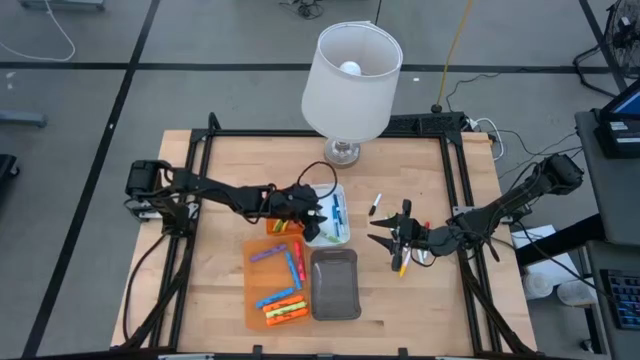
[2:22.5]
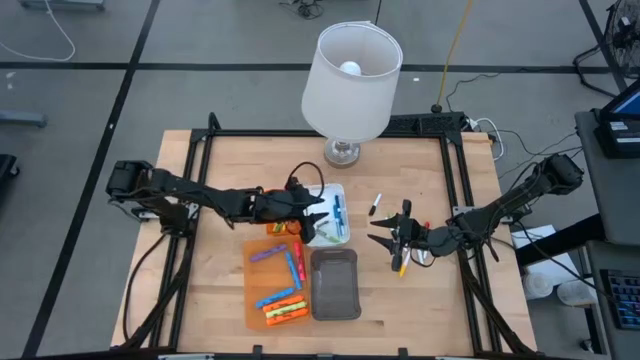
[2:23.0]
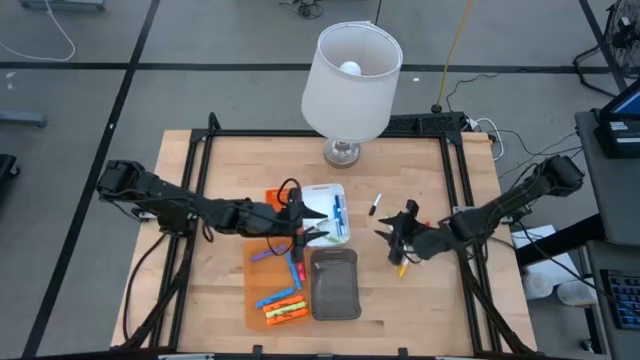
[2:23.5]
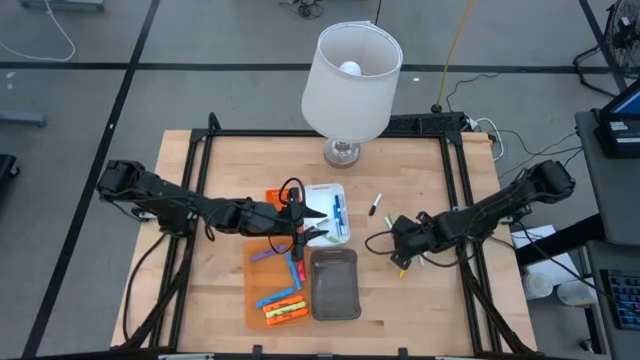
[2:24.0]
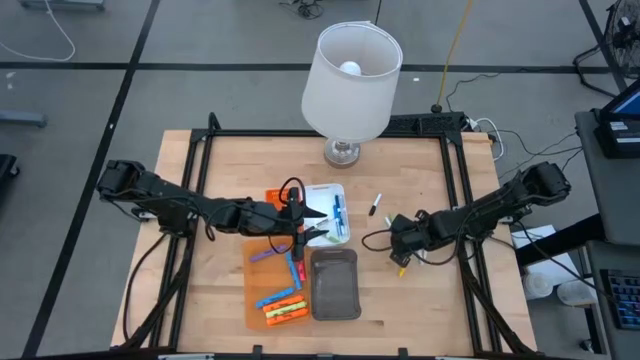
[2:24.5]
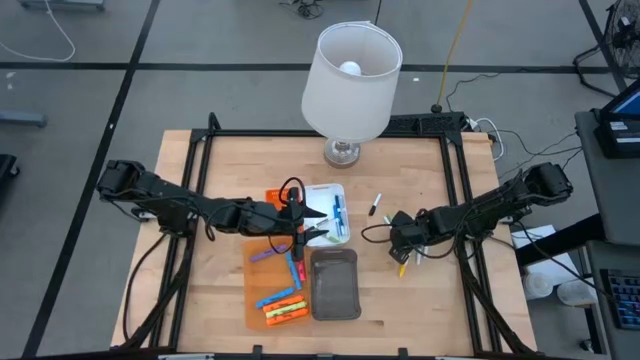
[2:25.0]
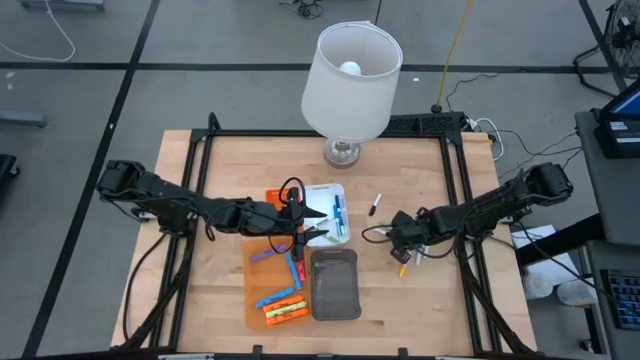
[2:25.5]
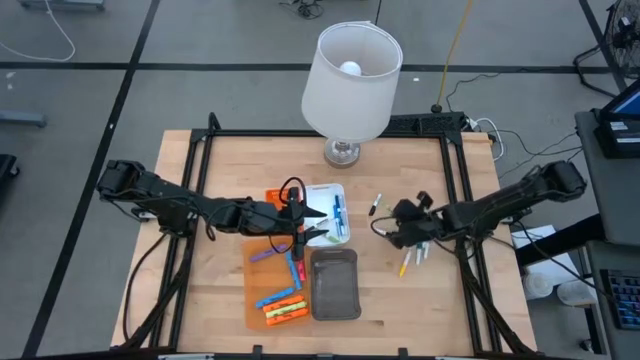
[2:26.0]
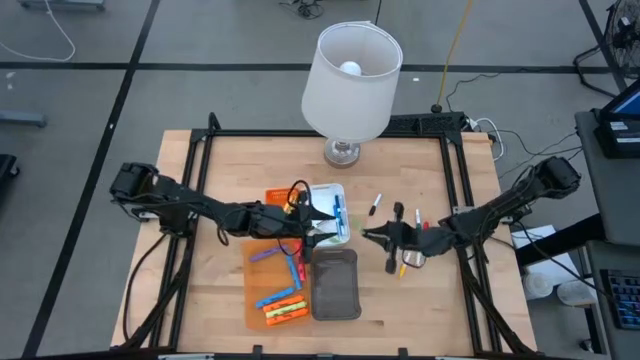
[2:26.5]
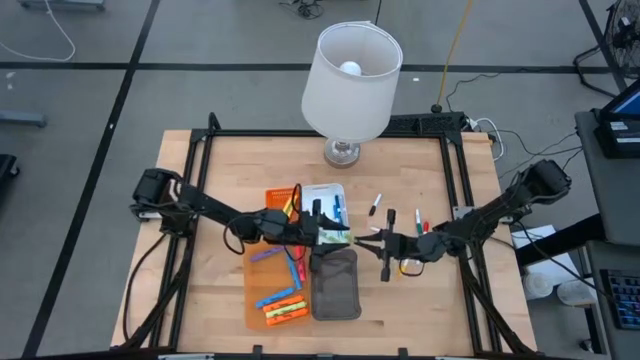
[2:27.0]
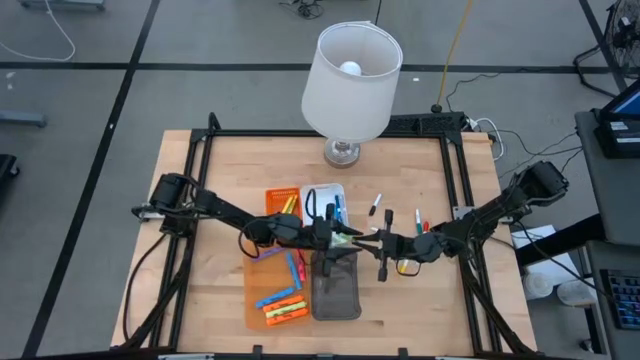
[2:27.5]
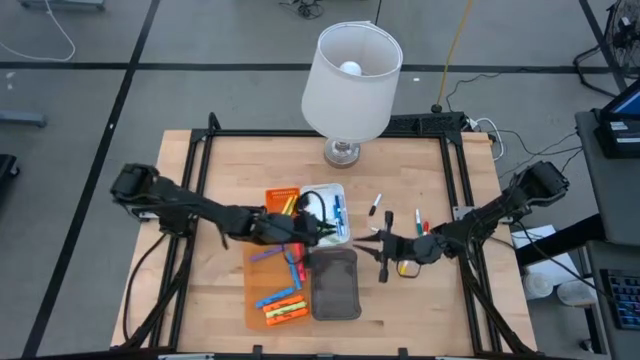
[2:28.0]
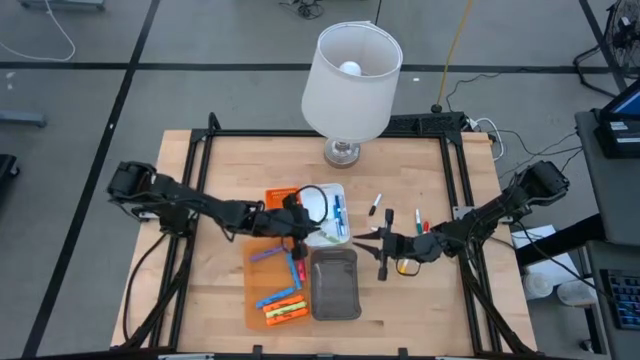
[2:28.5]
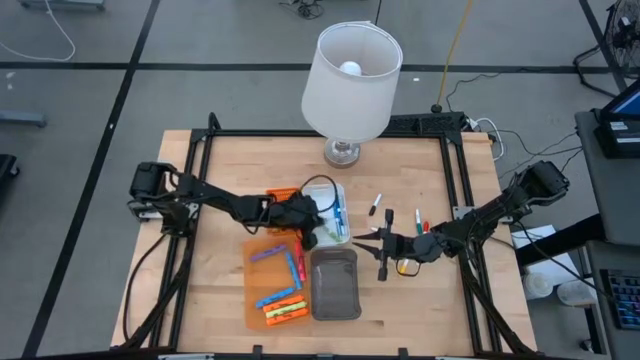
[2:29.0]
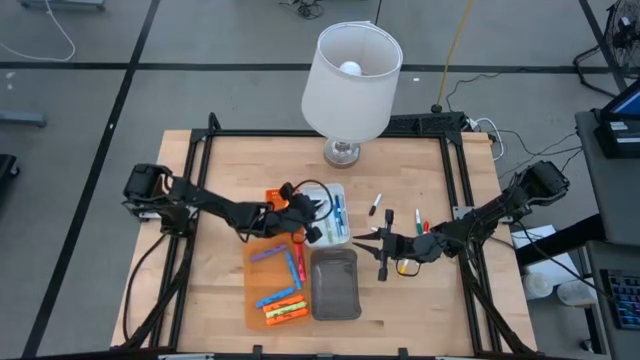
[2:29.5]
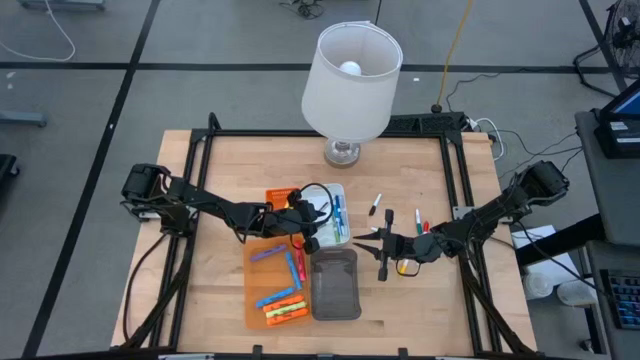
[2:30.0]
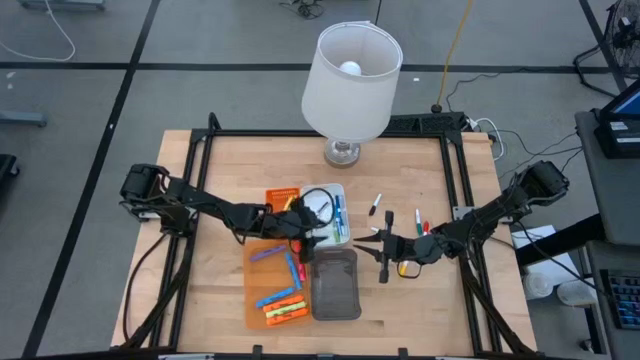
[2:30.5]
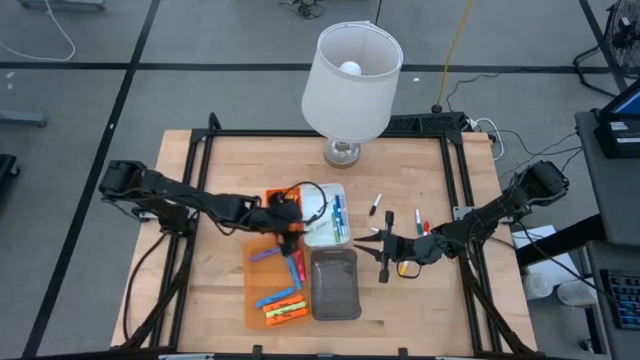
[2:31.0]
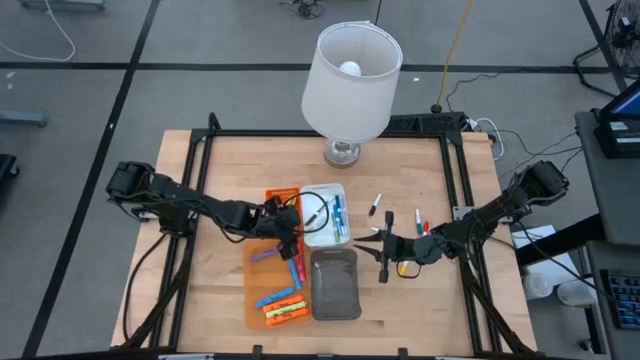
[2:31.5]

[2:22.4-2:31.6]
Task: Pick & Place Markers
Put the light green marker pen into the white bin

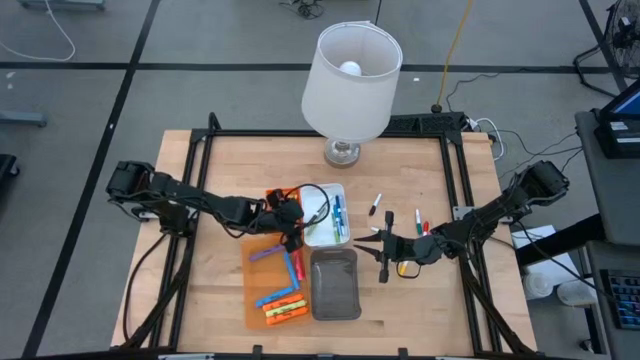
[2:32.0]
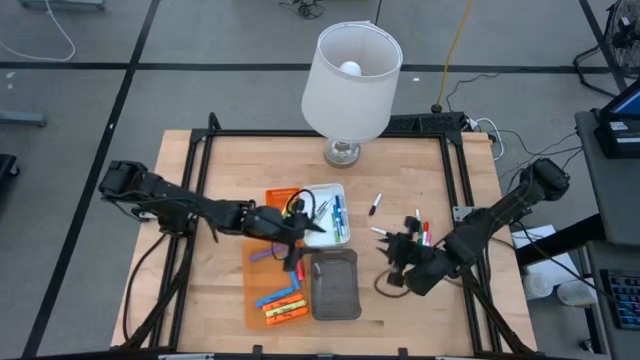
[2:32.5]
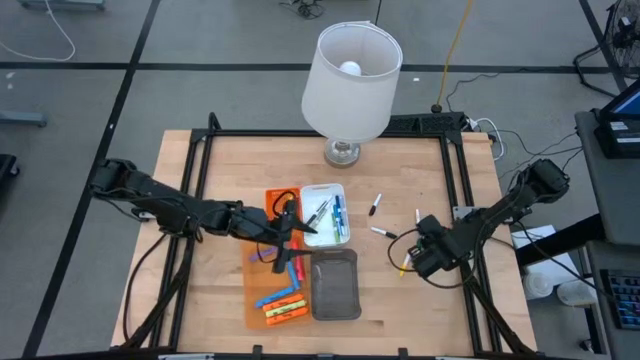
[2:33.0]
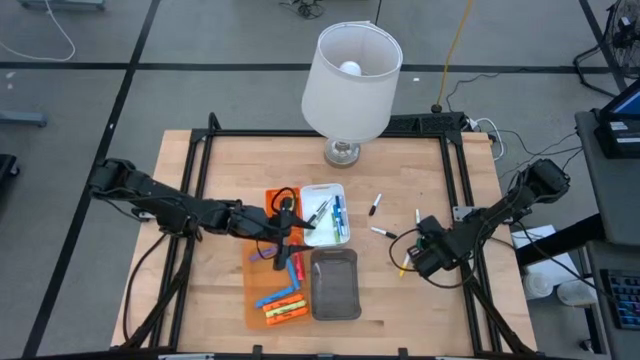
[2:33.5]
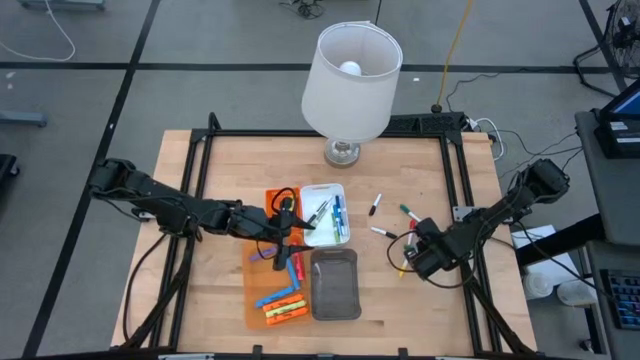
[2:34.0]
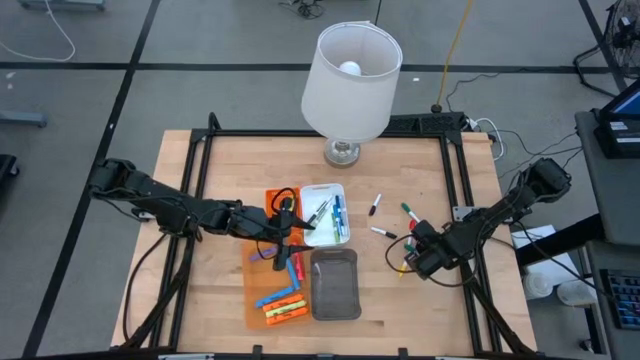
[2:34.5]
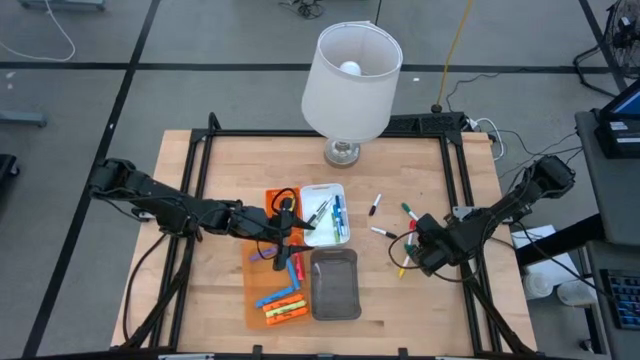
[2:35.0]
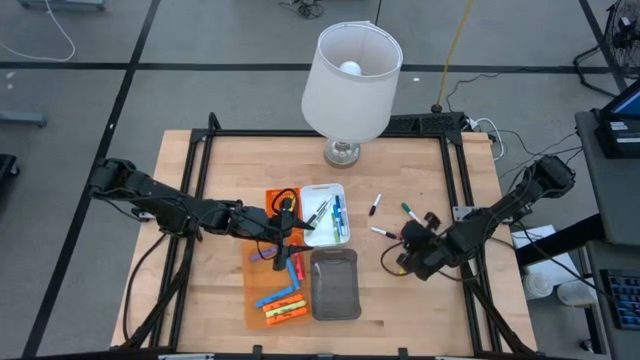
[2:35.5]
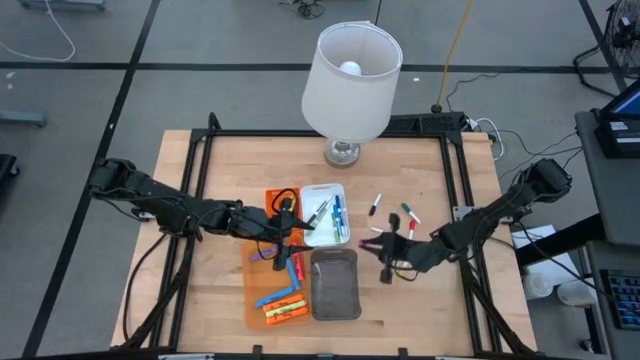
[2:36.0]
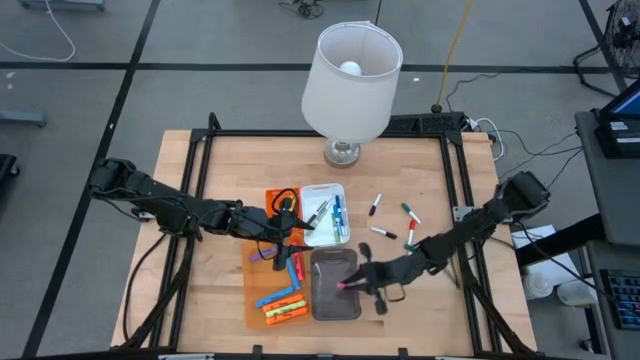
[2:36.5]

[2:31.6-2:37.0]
Put the pink small highlighter pen into the black bin

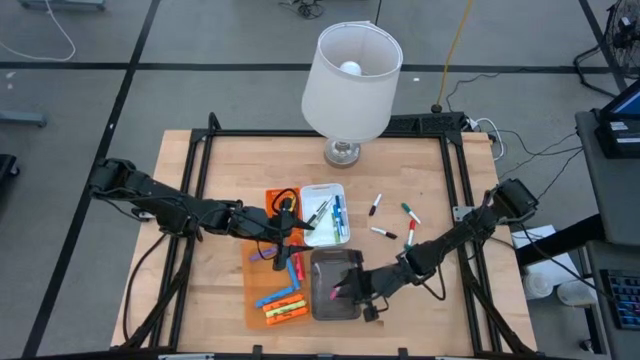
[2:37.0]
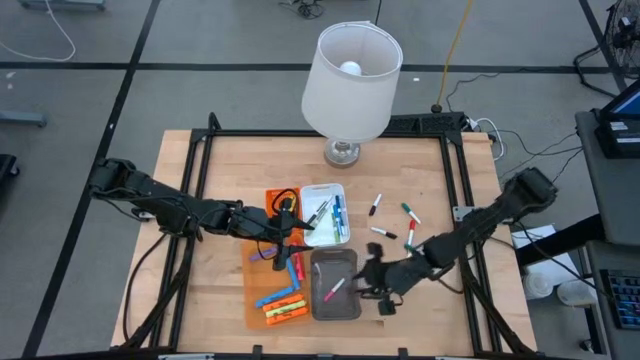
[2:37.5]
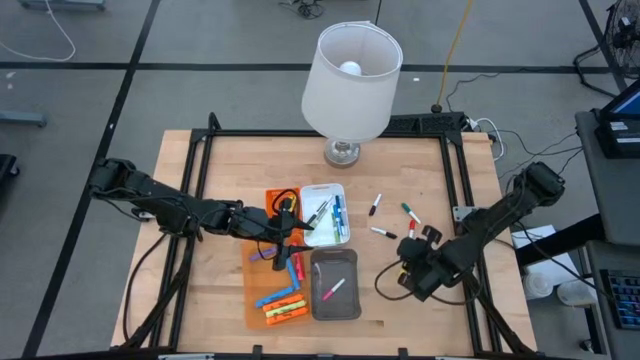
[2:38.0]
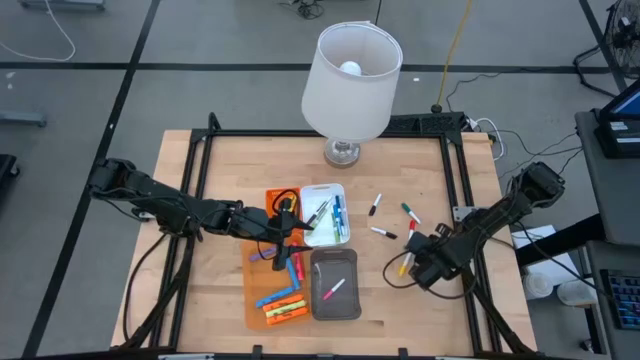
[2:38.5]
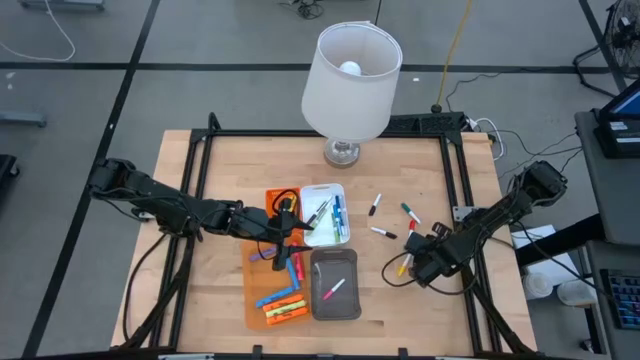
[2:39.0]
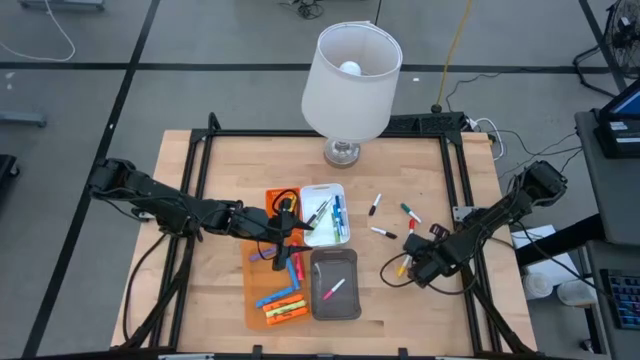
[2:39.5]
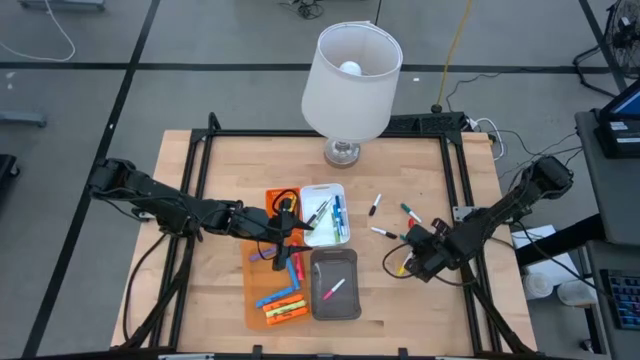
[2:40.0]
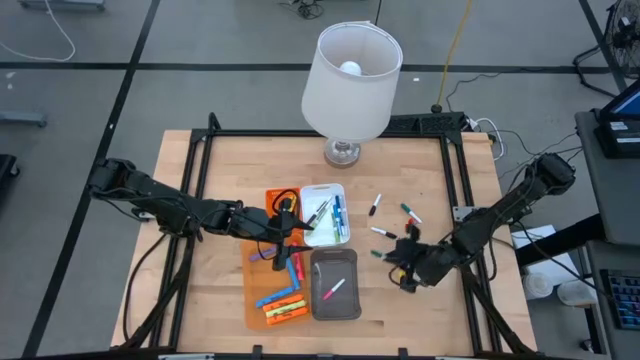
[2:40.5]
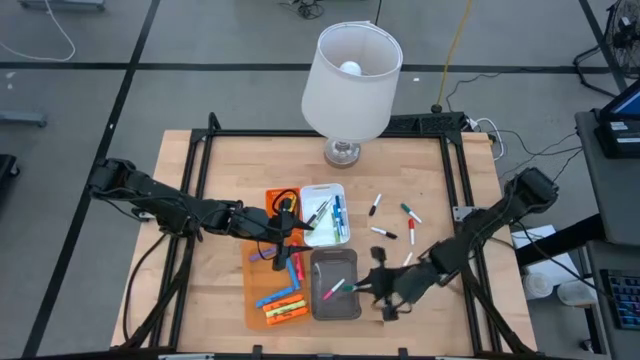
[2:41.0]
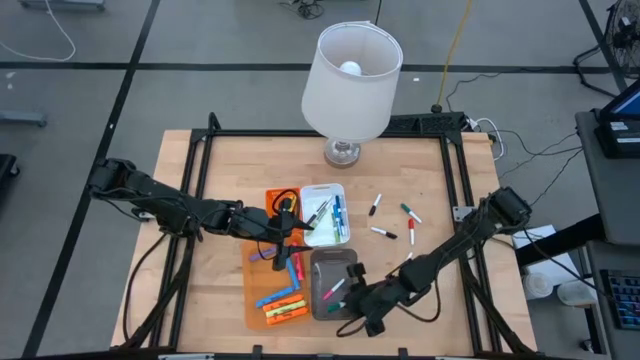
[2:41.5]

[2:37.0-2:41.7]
Put the bottom green small highlighter pen into the black bin

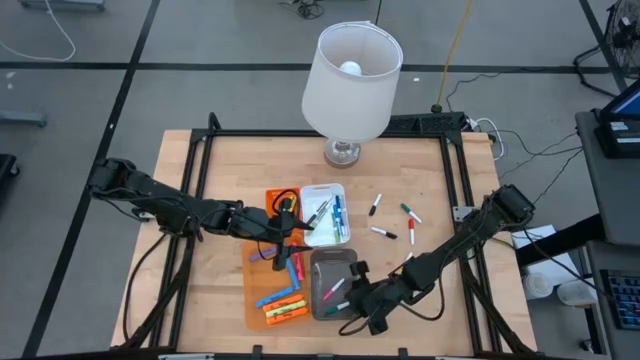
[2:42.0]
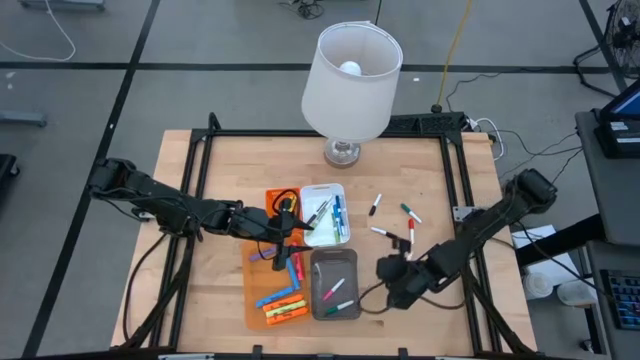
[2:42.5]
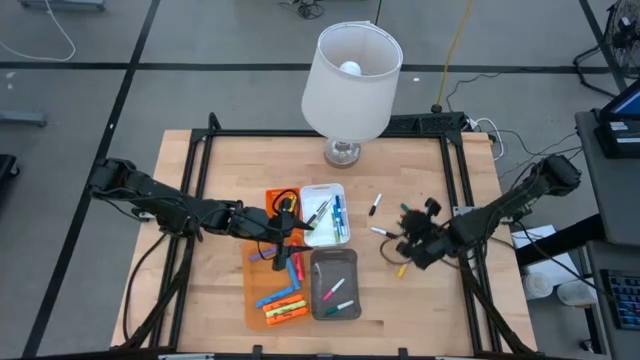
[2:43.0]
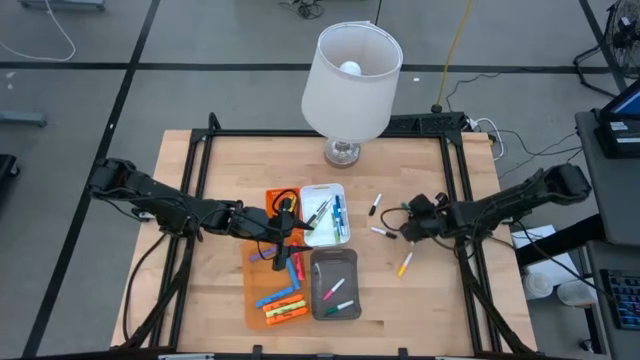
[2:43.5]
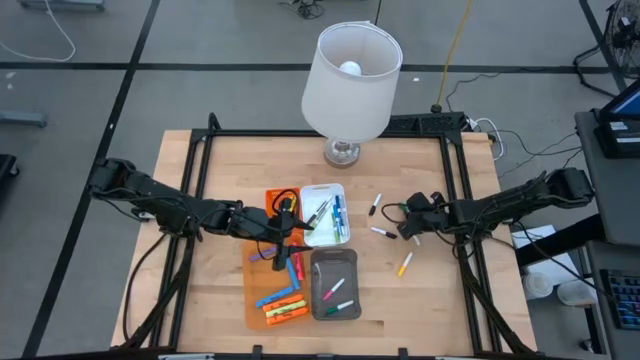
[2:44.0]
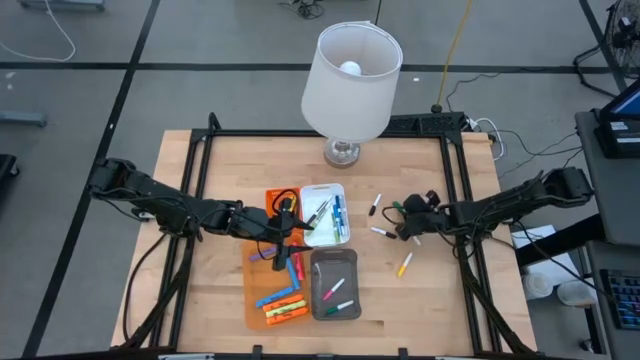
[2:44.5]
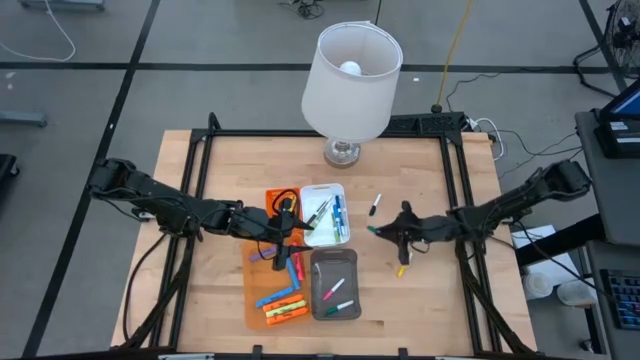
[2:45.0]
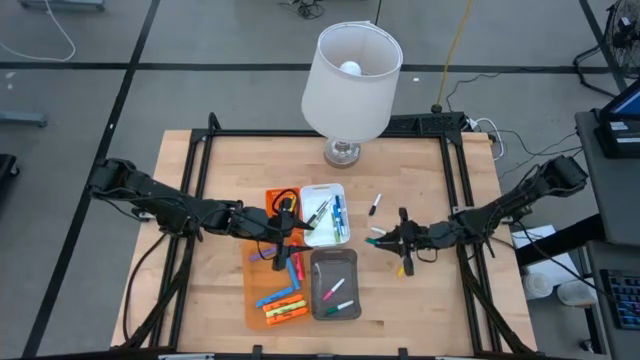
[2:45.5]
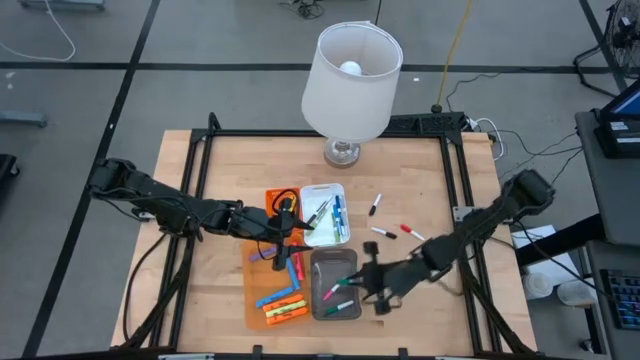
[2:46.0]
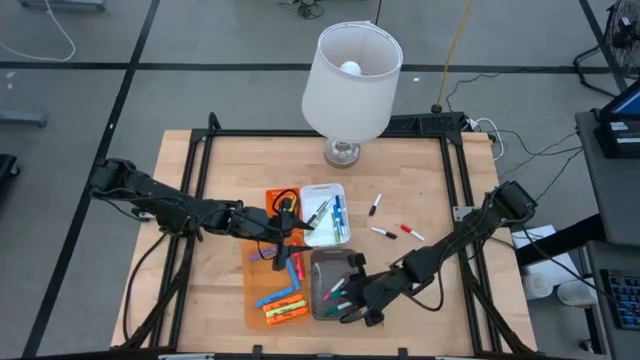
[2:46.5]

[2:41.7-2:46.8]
Put the green small highlighter pen into the black bin
